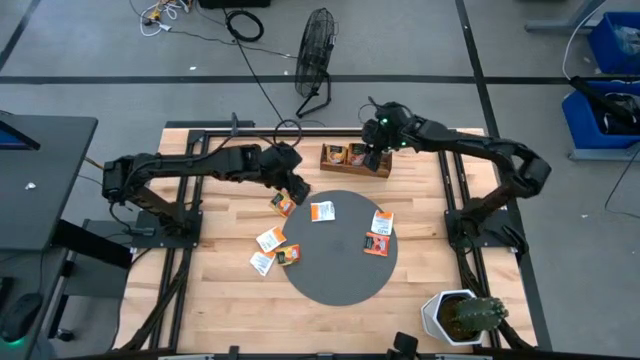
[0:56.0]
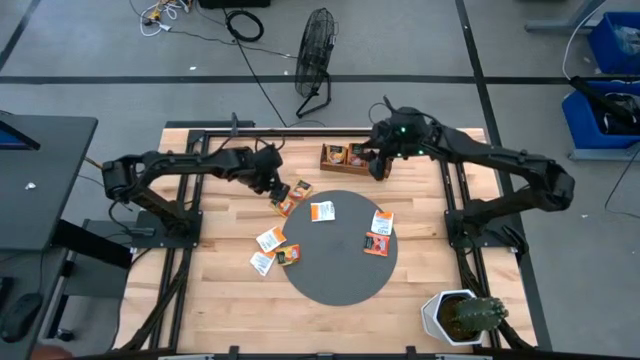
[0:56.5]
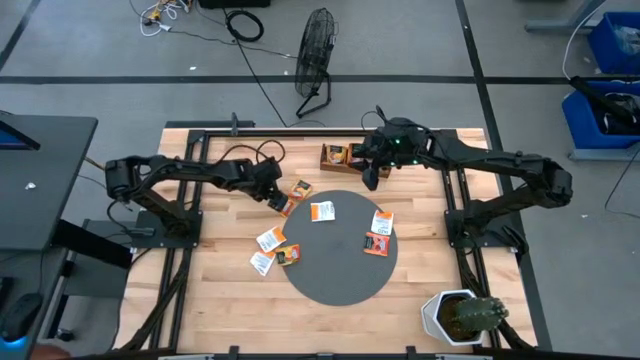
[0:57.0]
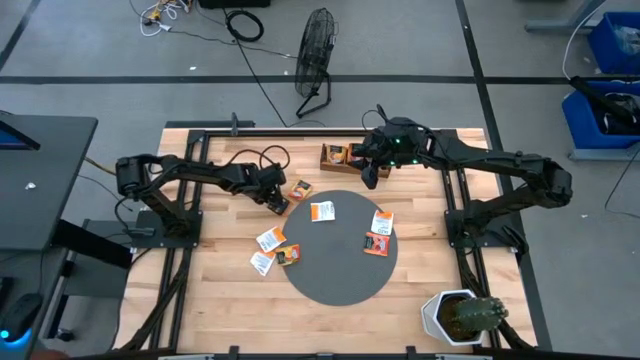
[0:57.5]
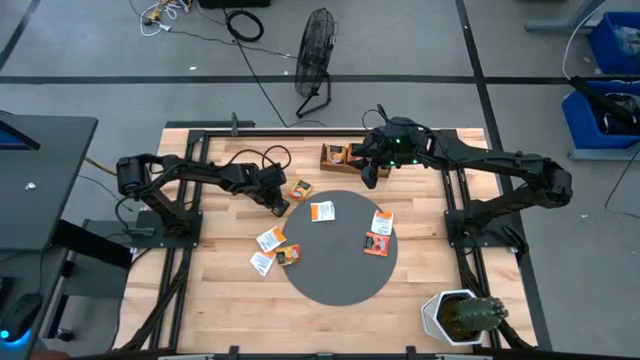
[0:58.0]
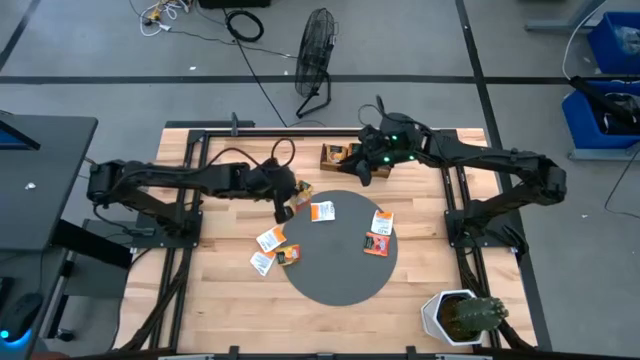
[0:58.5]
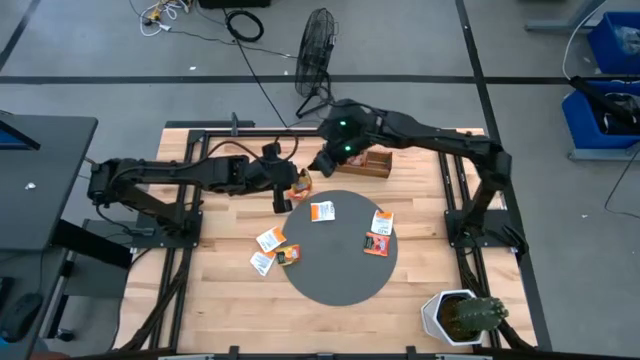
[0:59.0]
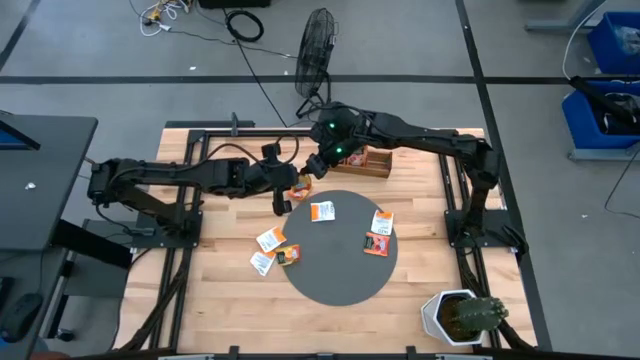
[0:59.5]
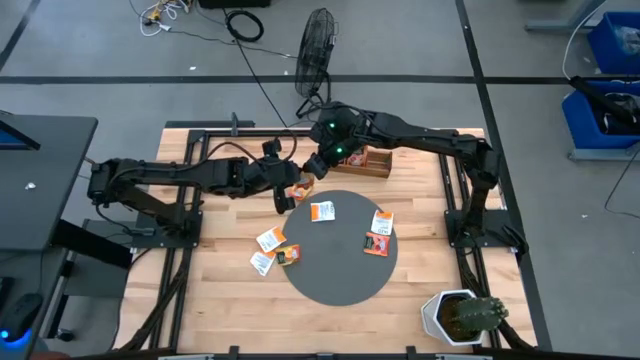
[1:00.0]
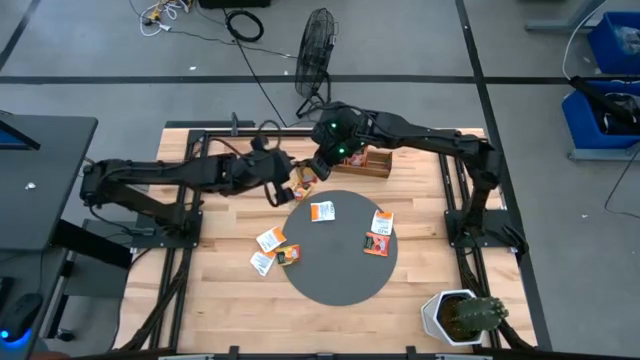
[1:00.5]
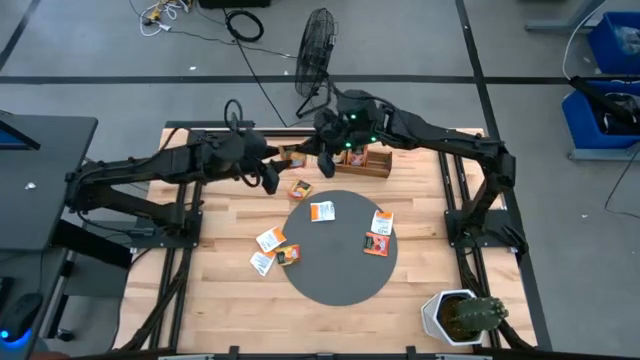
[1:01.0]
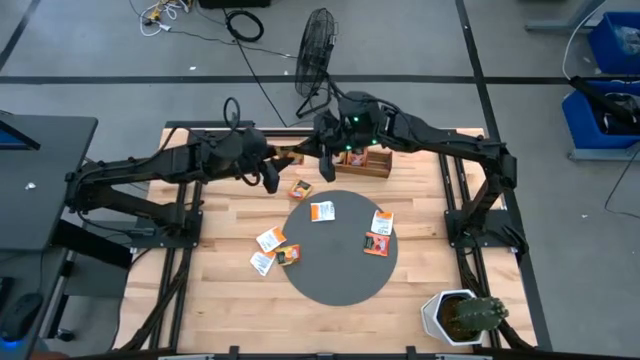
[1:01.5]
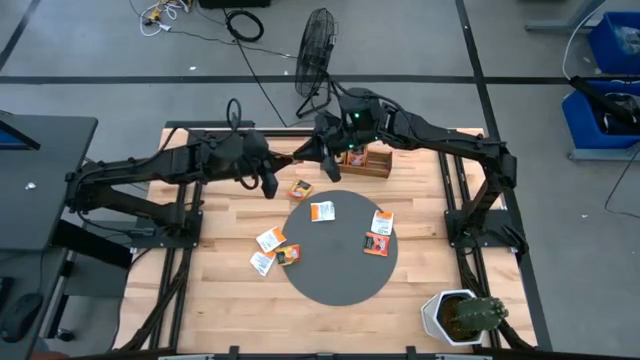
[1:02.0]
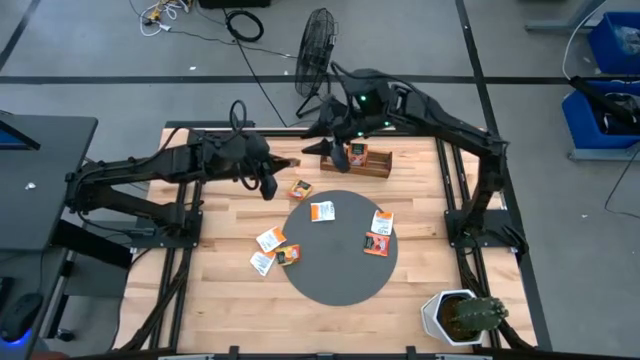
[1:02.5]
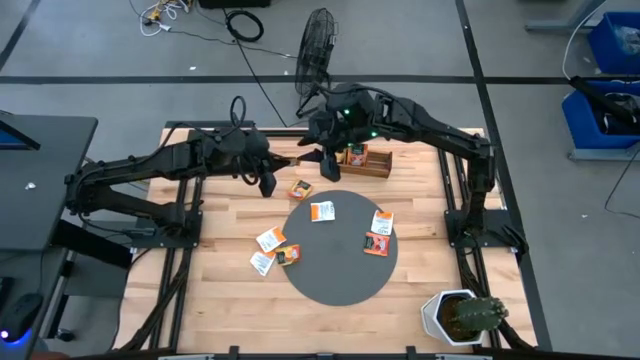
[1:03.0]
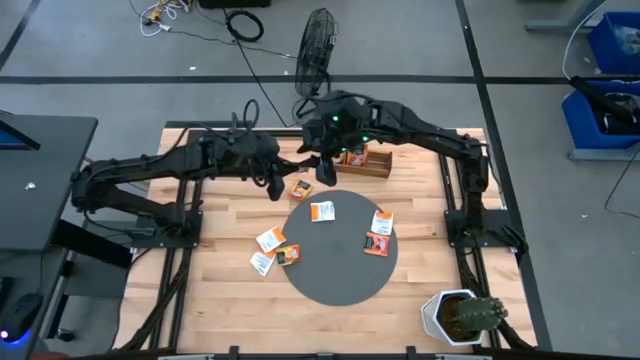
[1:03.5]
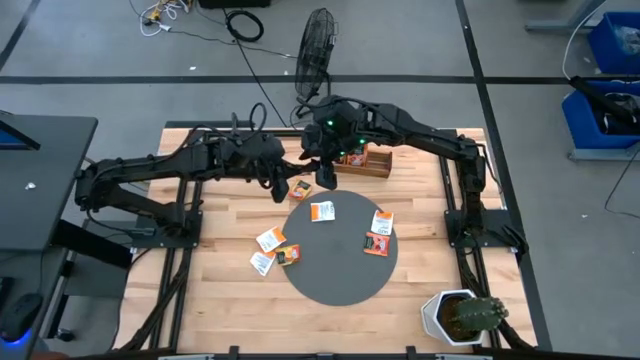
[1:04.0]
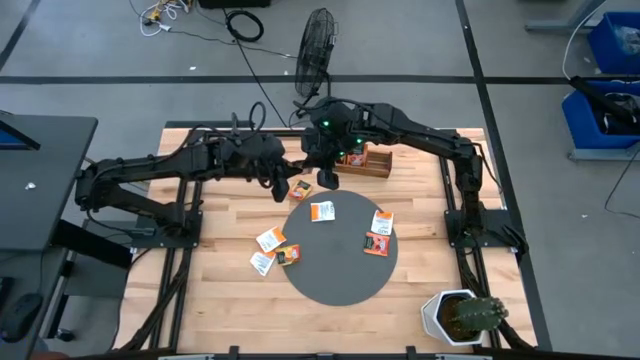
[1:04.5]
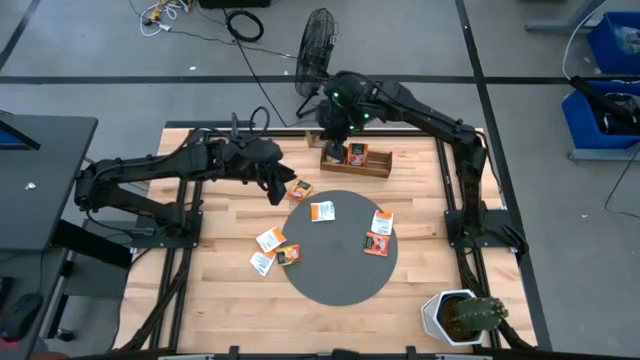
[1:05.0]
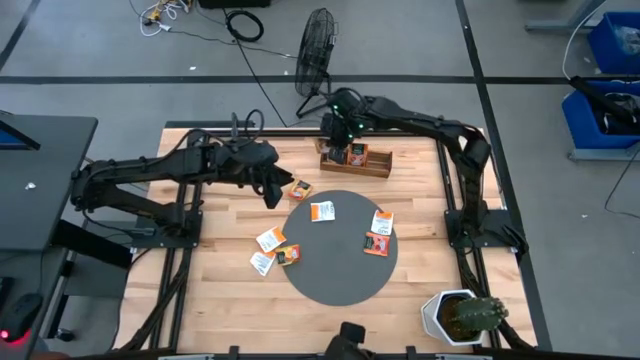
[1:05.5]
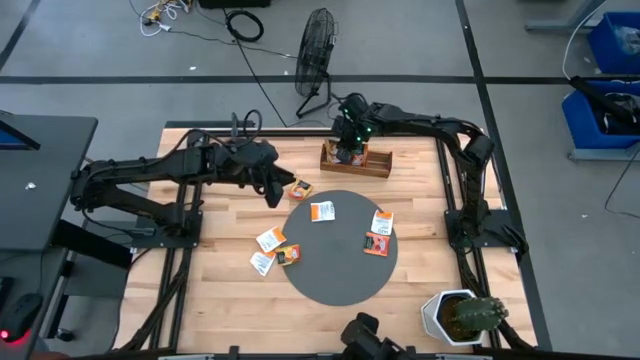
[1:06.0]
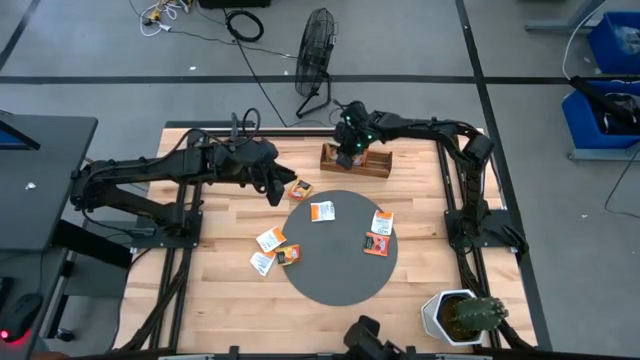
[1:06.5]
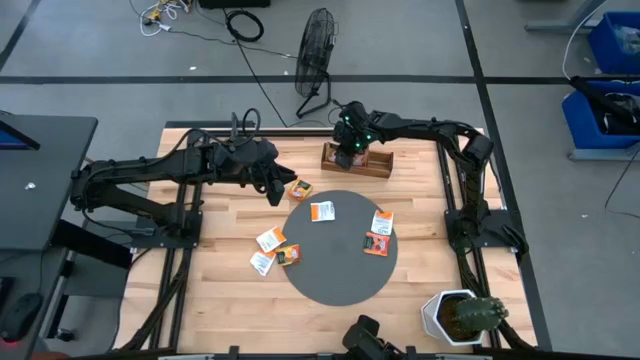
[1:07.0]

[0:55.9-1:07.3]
Task: Pick & Place Tea
Put the yellow tea bag into the left section of the wooden organizer

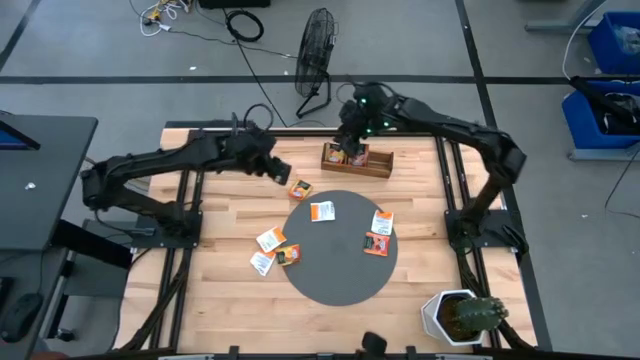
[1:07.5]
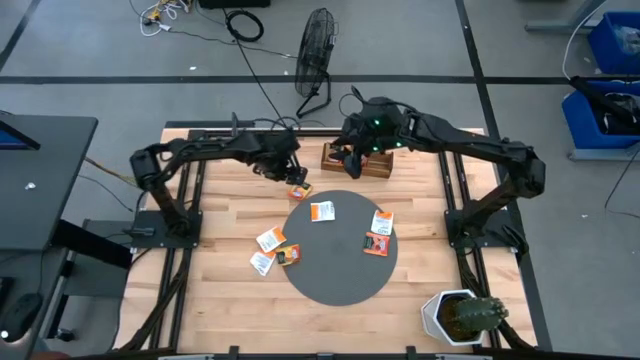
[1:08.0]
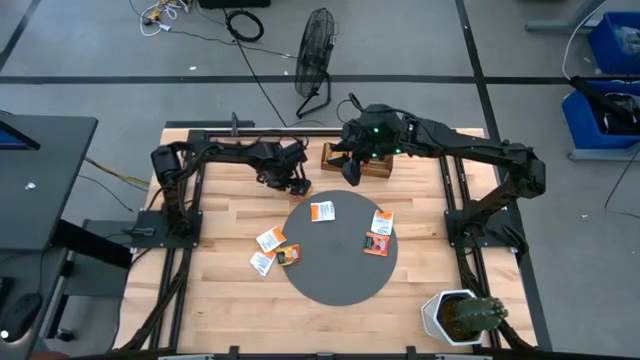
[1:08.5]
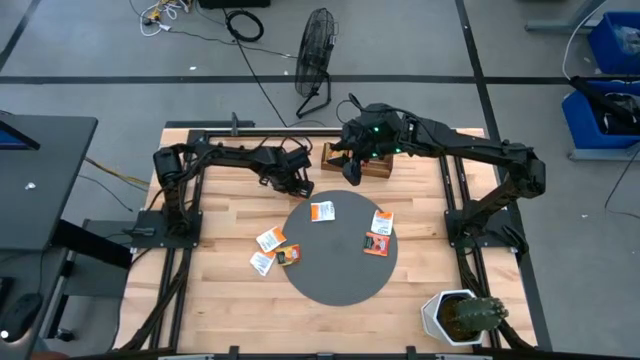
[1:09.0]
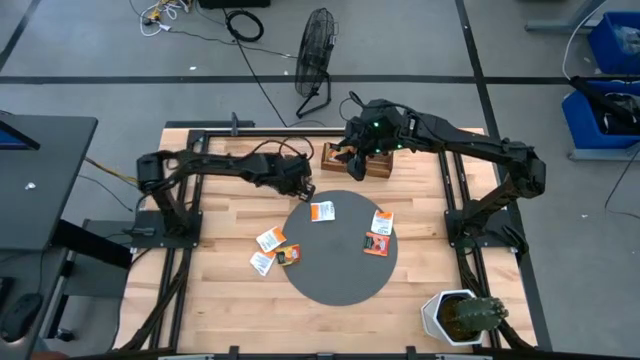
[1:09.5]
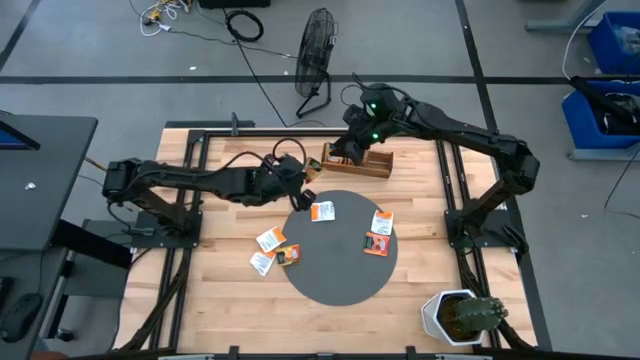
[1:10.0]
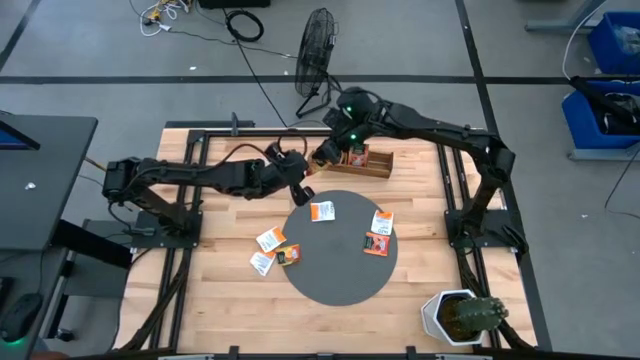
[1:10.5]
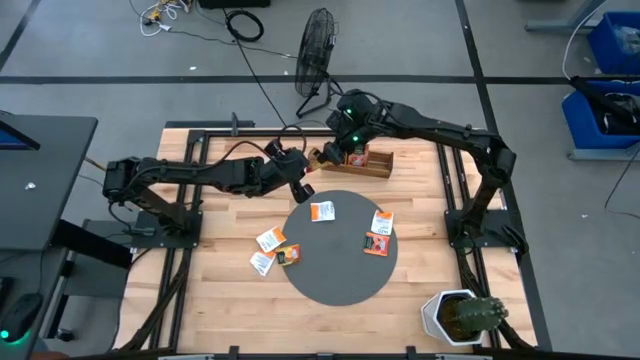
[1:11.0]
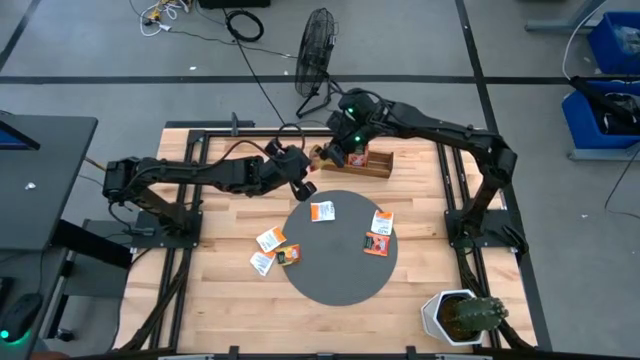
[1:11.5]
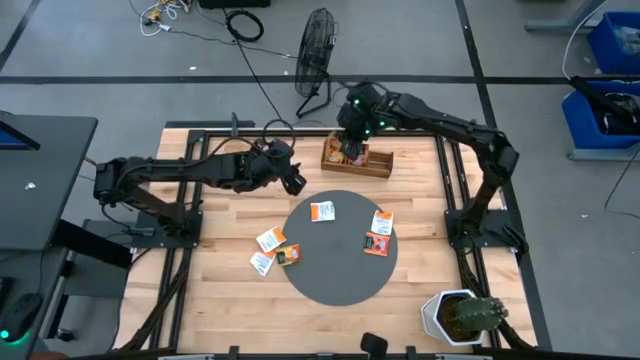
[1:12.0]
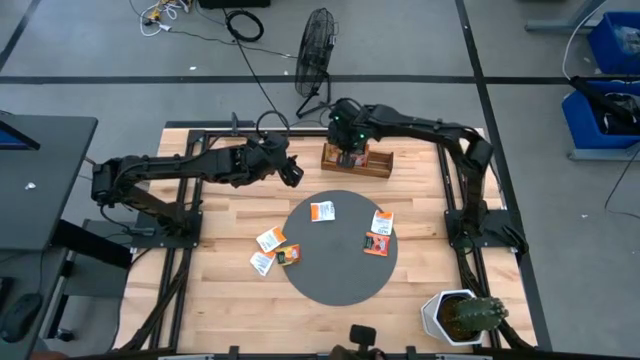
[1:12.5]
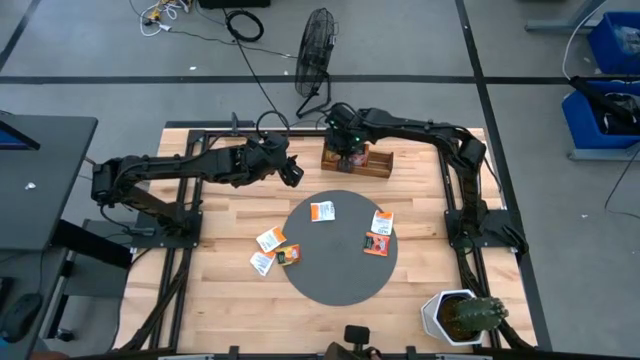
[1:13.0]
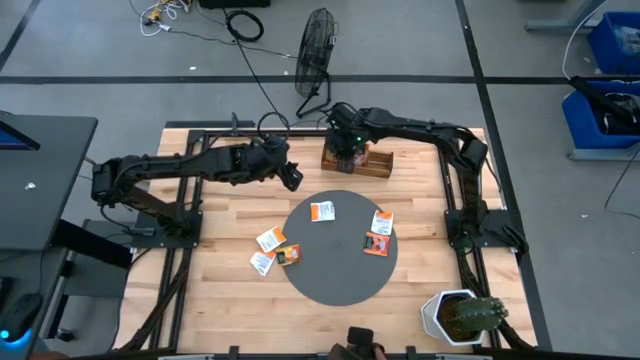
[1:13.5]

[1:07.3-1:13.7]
Put the yellow tea bag into the left section of the wooden organizer
